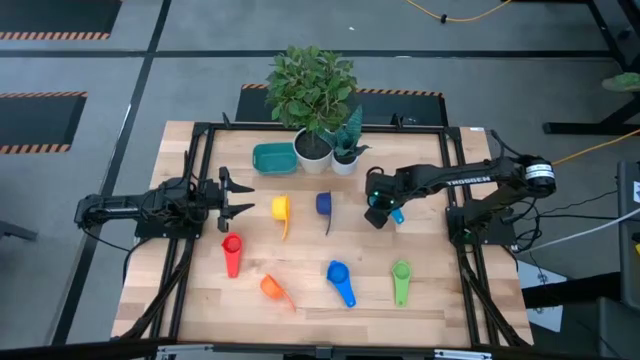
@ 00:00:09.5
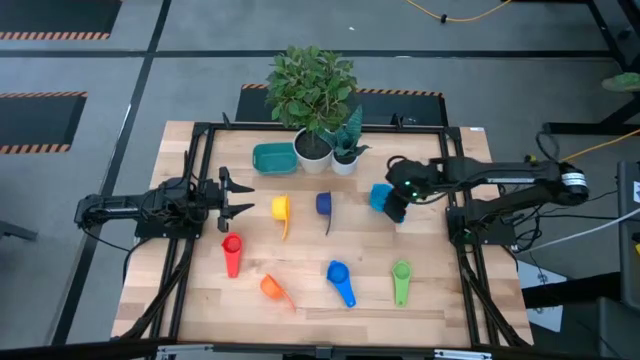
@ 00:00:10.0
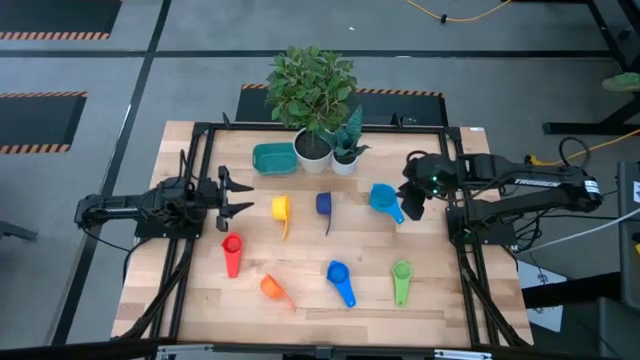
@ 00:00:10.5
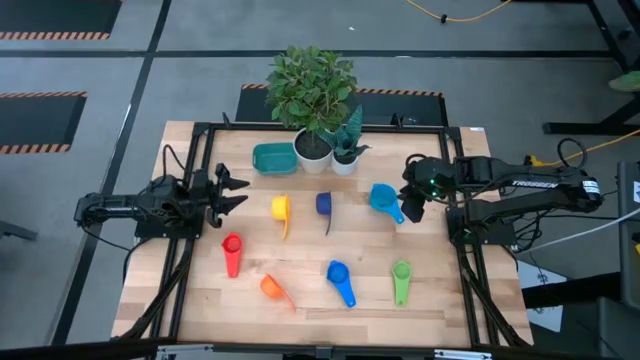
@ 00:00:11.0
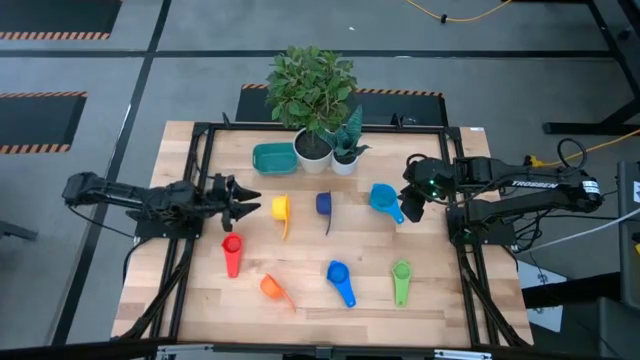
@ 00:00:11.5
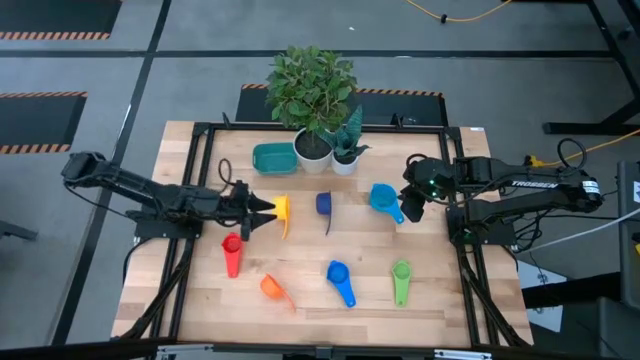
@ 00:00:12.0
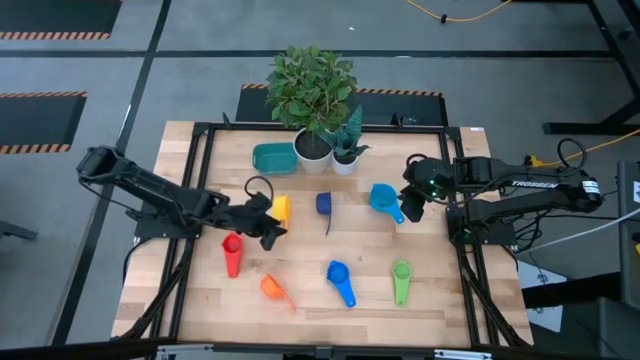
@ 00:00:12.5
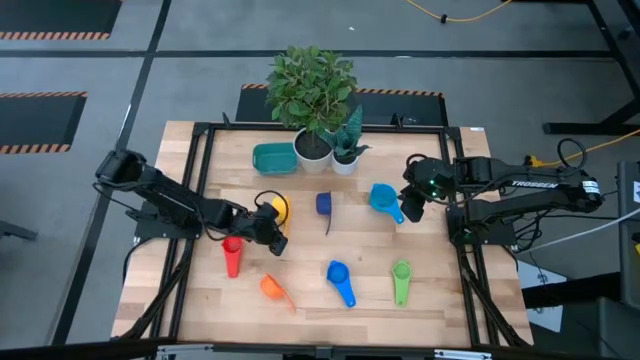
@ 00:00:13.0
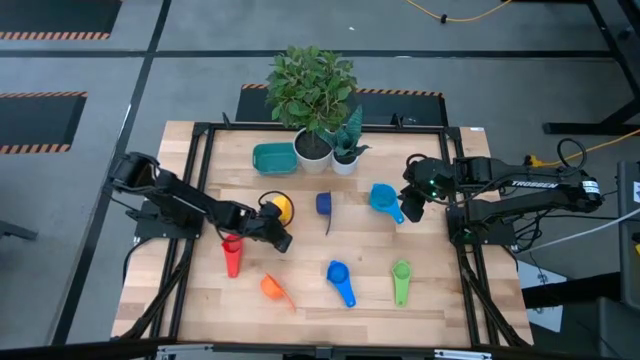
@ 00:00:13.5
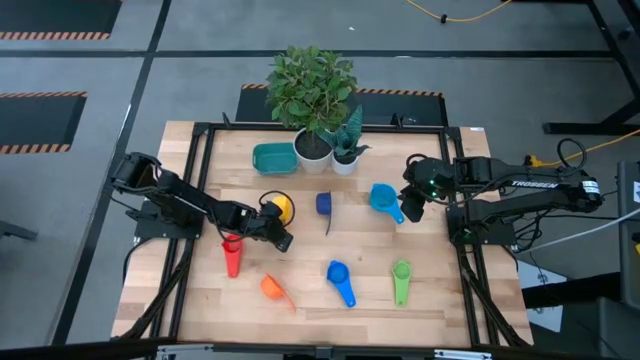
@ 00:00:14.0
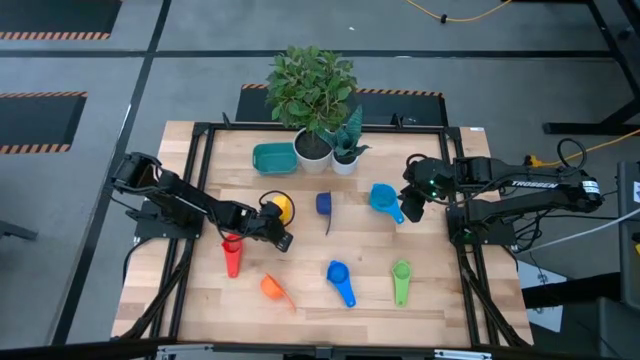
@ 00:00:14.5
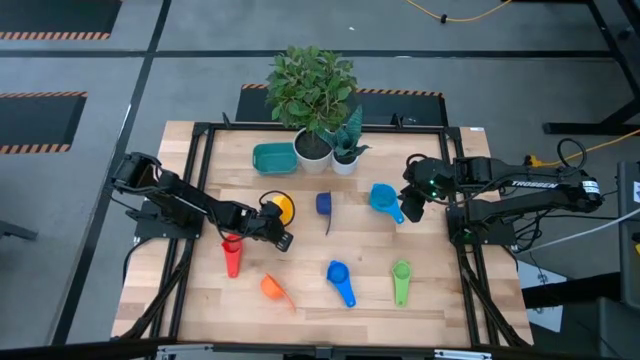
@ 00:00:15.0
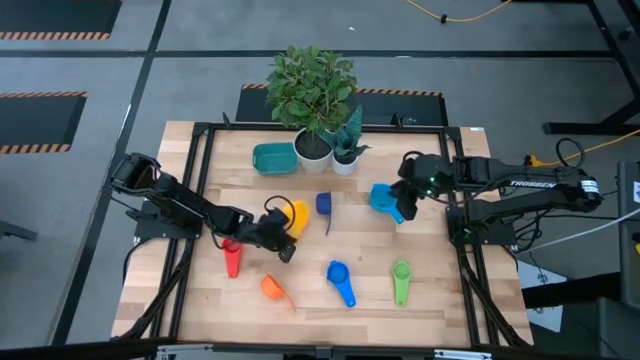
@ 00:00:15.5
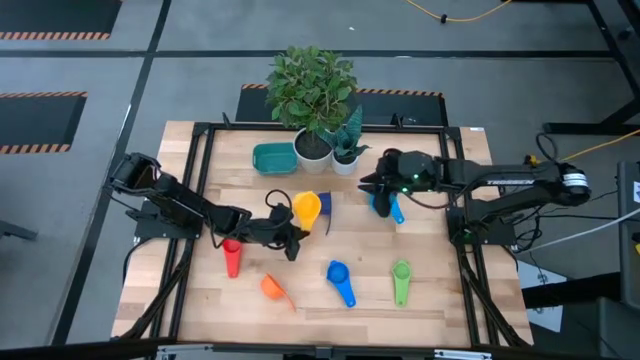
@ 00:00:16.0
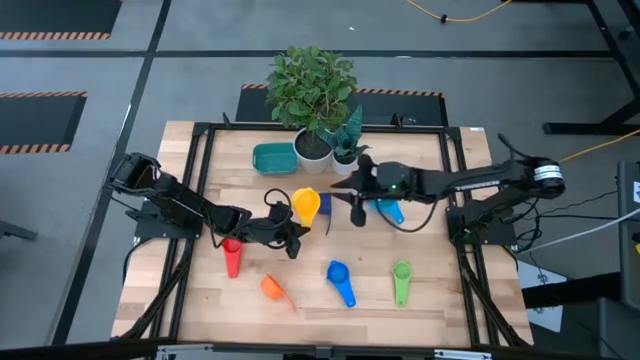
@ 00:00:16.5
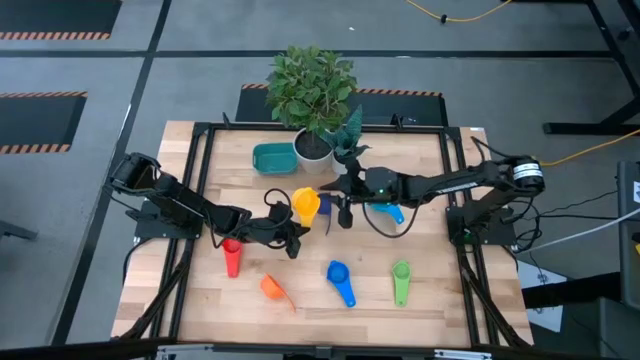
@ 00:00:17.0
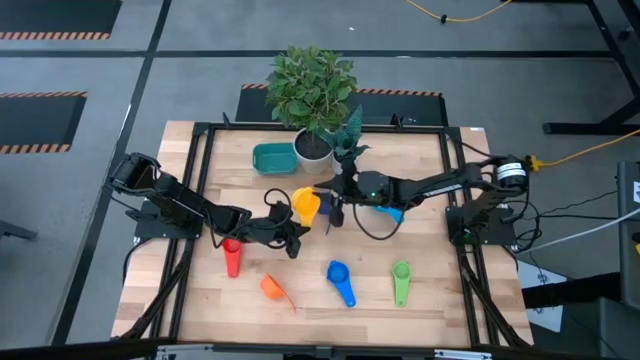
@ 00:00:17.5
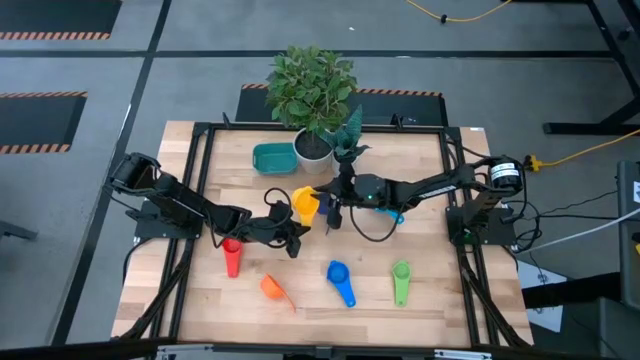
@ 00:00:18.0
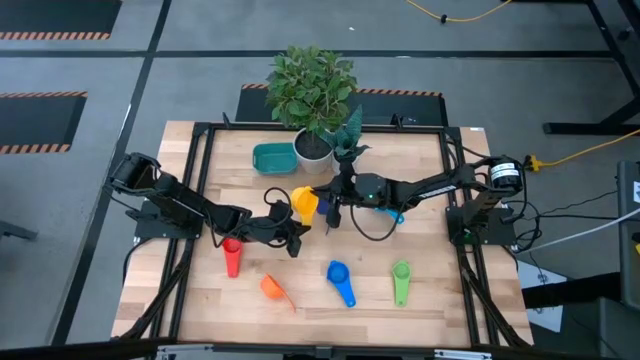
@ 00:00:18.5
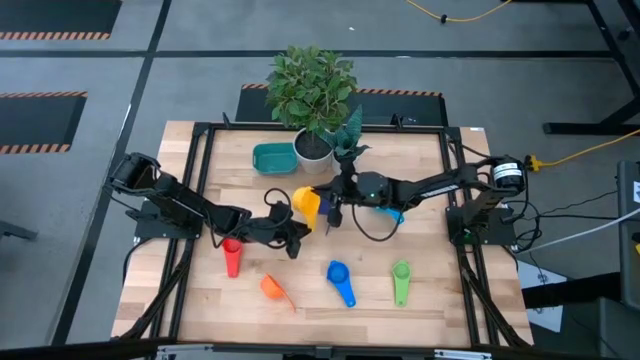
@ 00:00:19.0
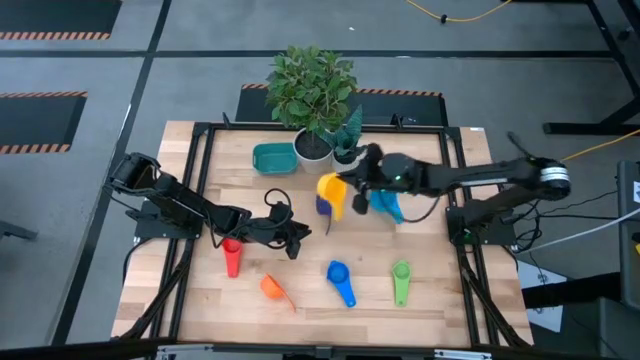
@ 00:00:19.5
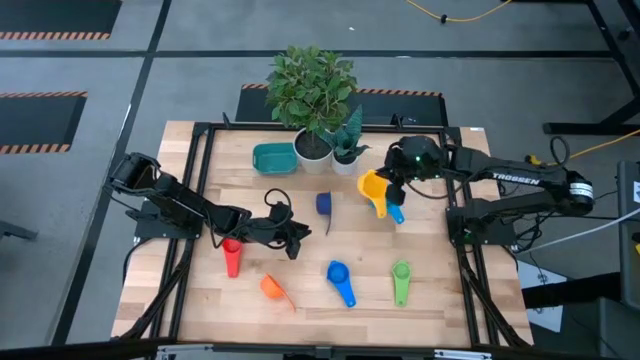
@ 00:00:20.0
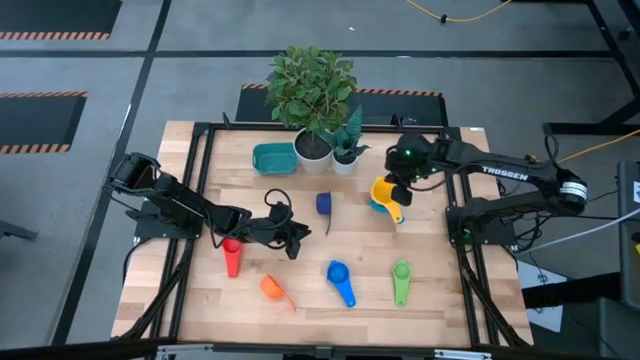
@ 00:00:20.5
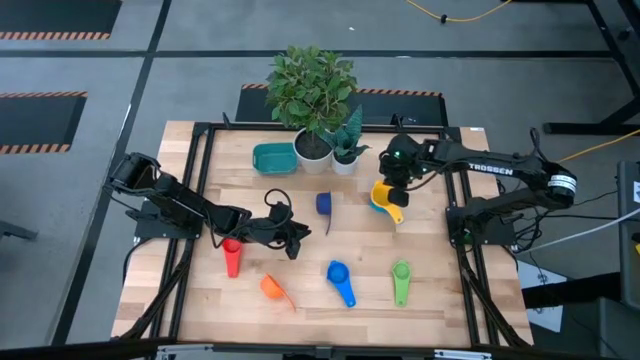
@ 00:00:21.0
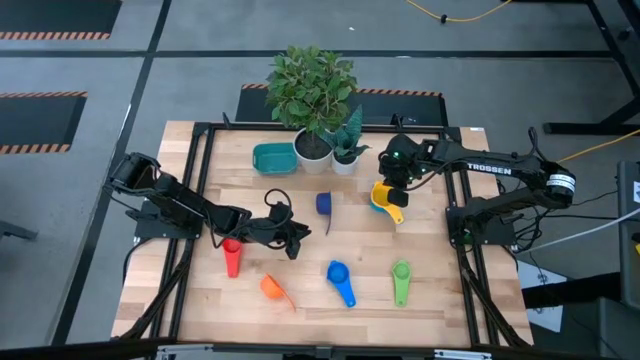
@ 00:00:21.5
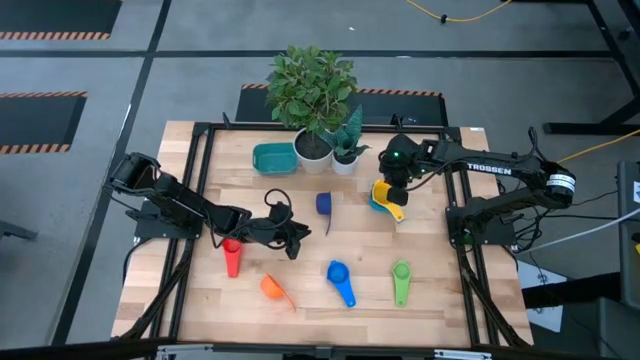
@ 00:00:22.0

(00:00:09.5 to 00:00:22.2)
Task: Nest measuring cups in basket
Stack the yellow measuring cup on top of the top light blue measuring cup

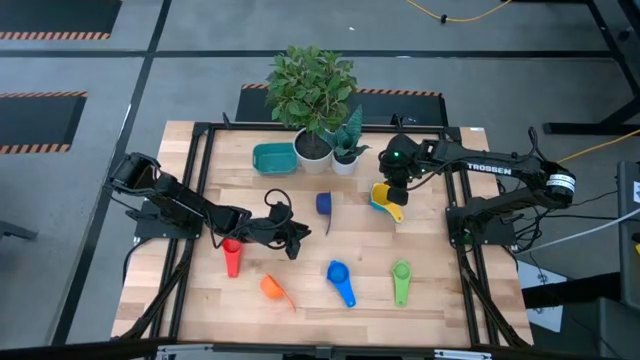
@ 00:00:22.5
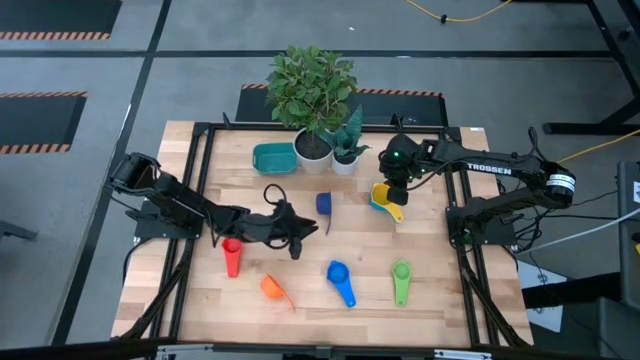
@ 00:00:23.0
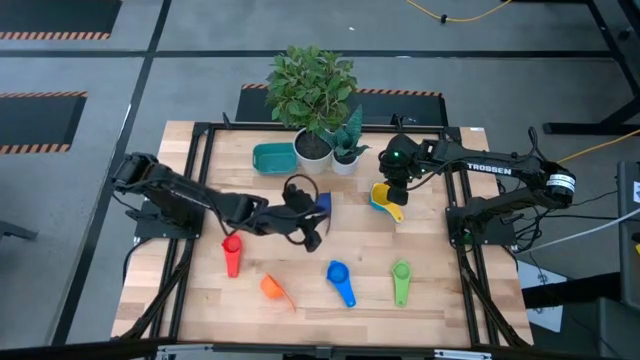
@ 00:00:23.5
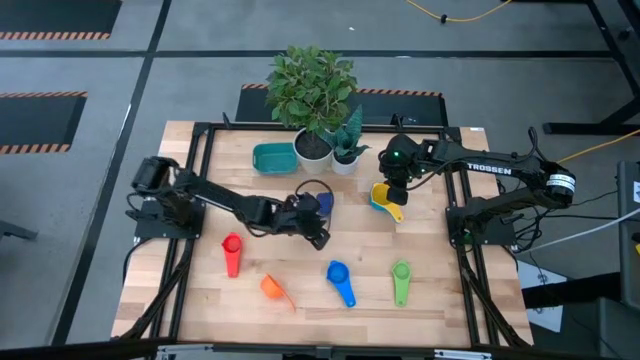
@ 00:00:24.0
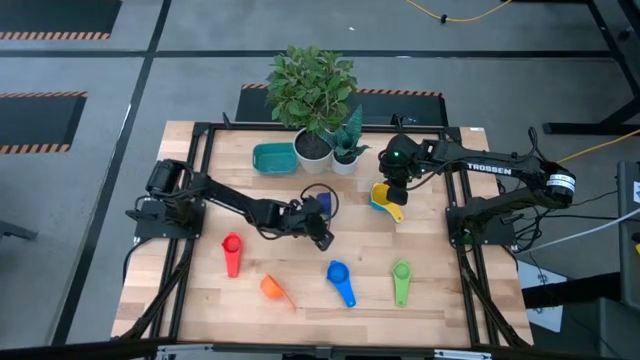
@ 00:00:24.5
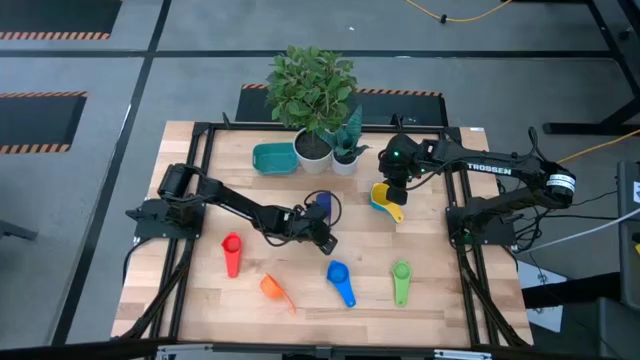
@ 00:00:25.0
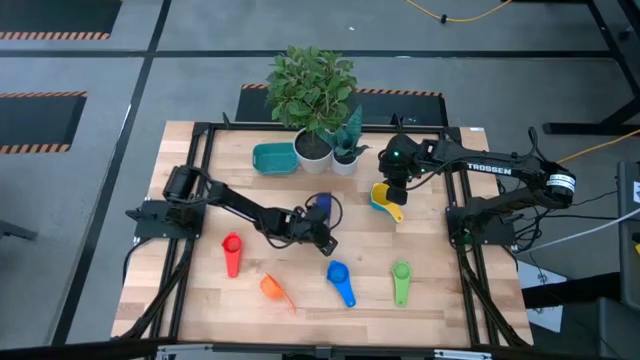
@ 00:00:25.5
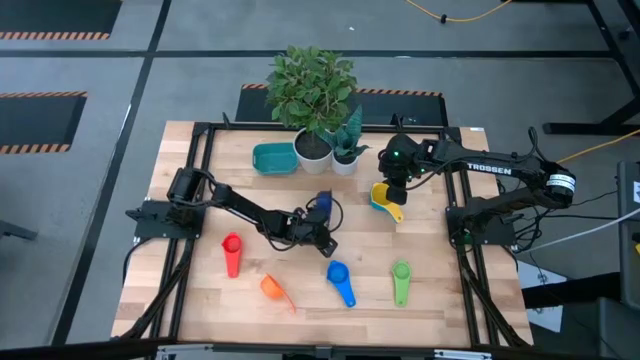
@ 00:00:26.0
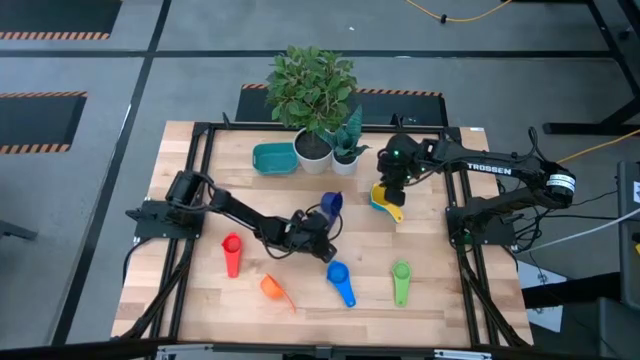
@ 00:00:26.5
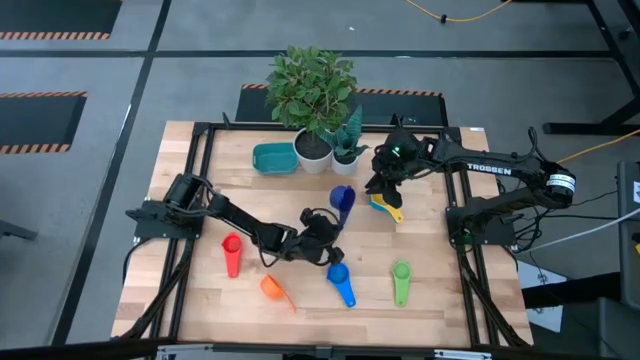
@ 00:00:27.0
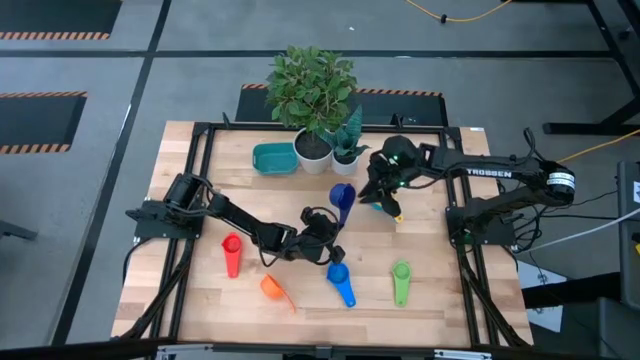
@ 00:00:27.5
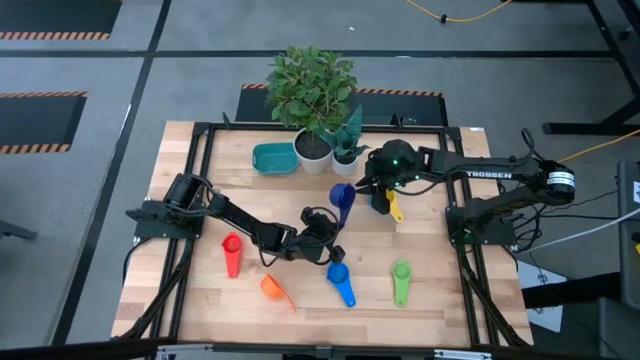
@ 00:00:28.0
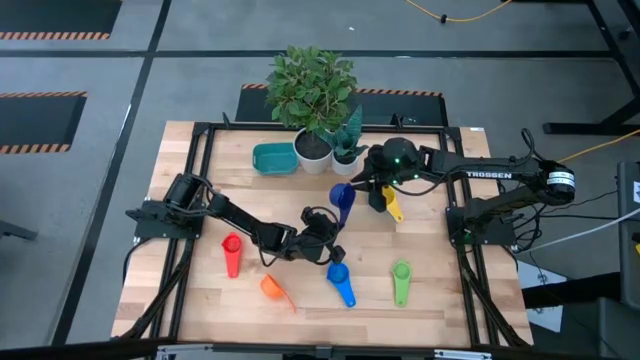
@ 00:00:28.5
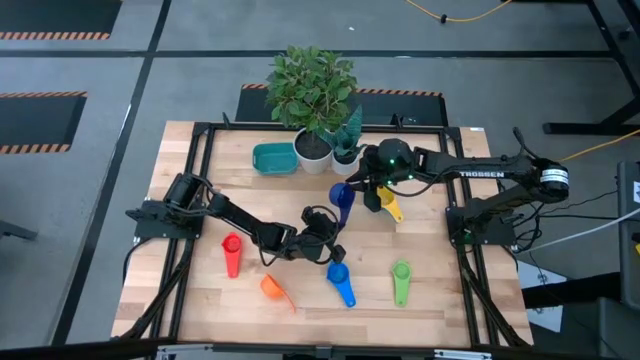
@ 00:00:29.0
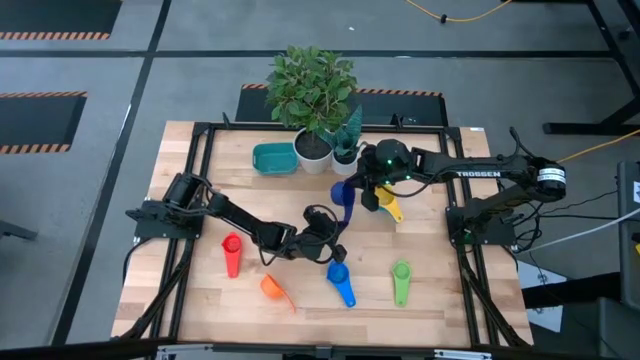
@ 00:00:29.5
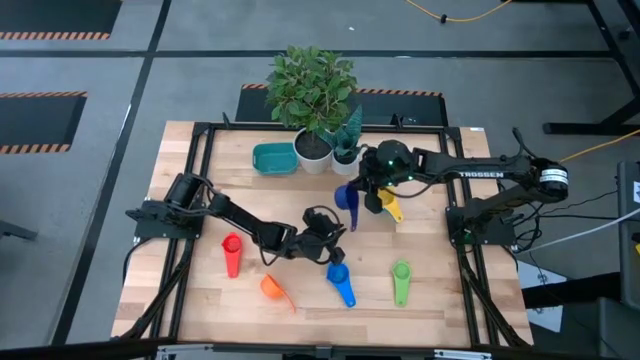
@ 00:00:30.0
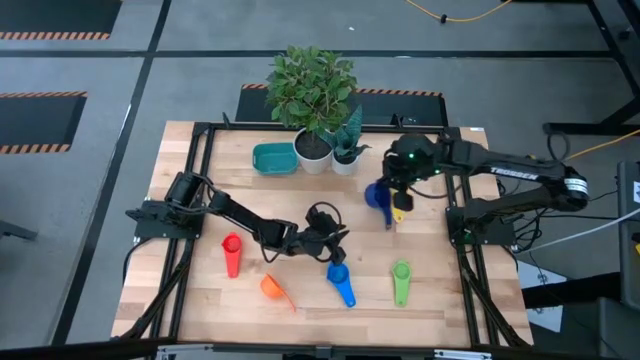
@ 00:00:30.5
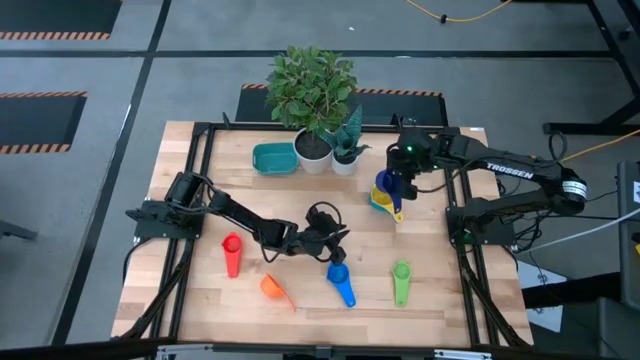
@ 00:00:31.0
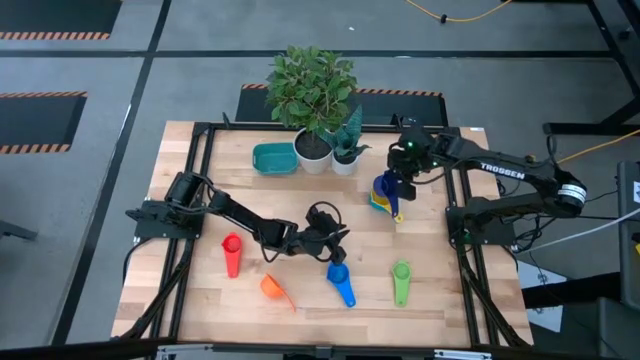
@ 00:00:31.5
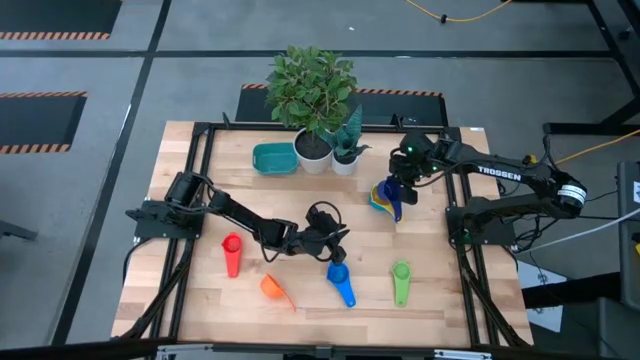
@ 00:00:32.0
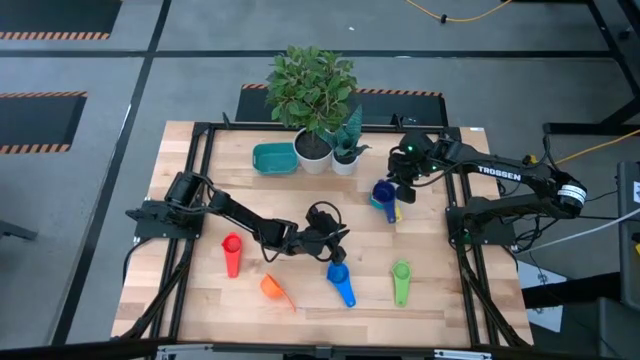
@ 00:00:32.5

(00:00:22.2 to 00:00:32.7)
Stack the blue measuring cup on top of the yellow measuring cup
